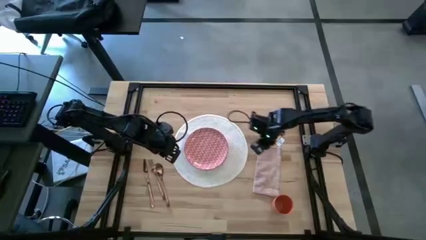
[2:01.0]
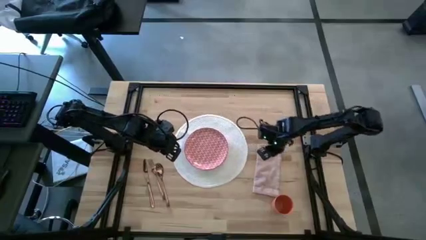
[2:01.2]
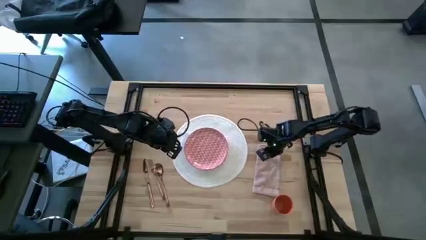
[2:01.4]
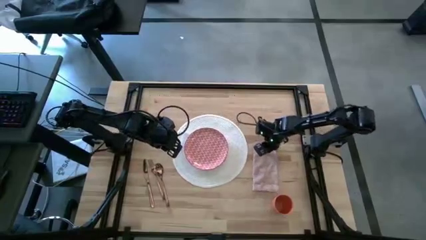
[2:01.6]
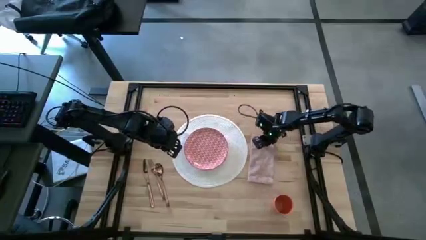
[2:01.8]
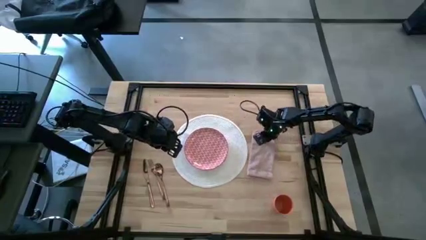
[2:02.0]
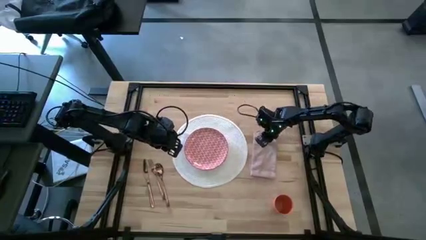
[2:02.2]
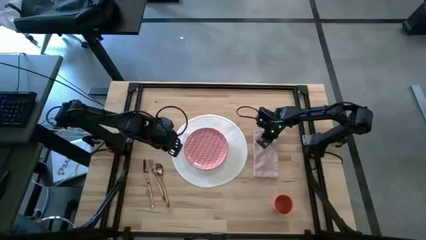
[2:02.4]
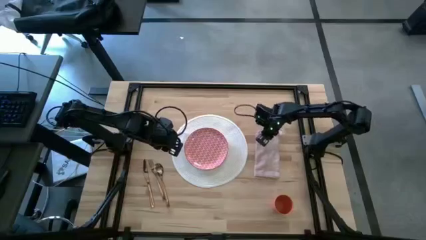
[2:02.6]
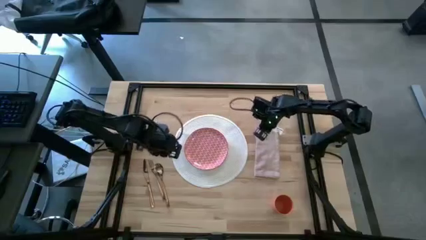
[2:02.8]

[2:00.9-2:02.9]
Task: Set table place
Adjust the pink napkin to the right of the white placemat

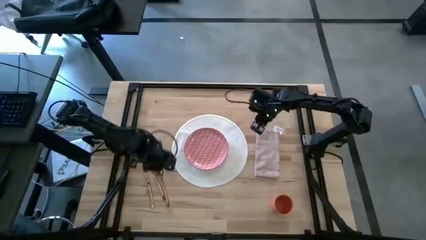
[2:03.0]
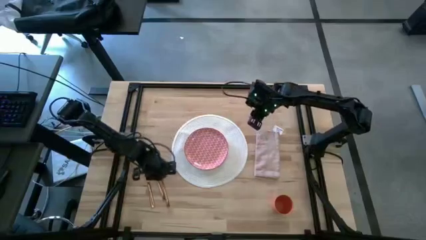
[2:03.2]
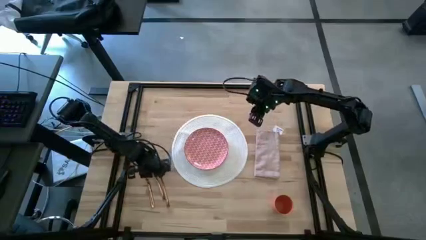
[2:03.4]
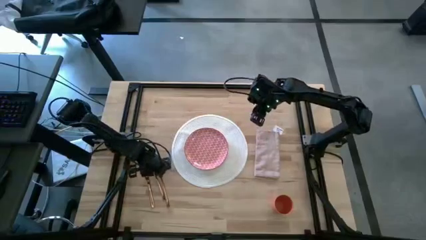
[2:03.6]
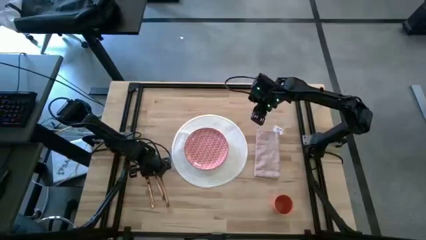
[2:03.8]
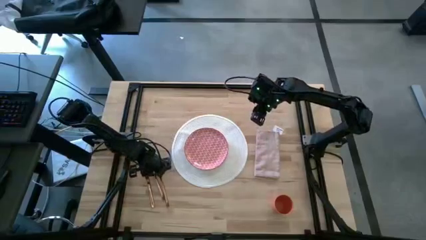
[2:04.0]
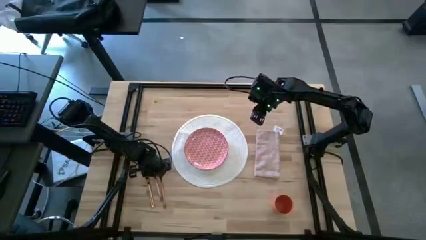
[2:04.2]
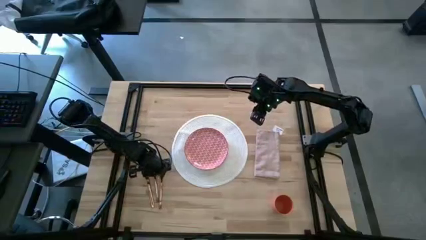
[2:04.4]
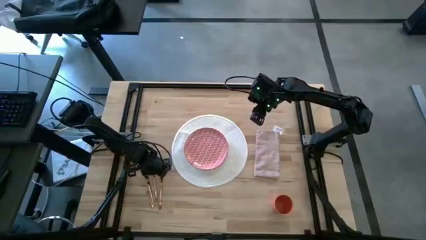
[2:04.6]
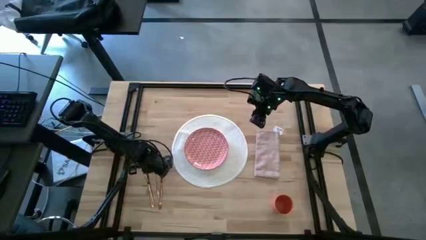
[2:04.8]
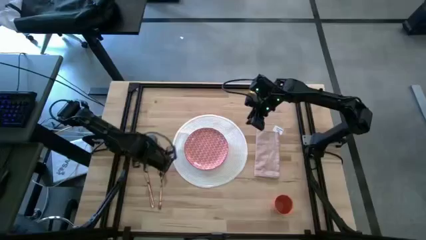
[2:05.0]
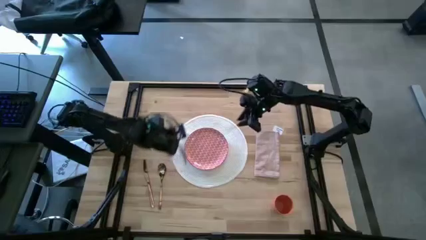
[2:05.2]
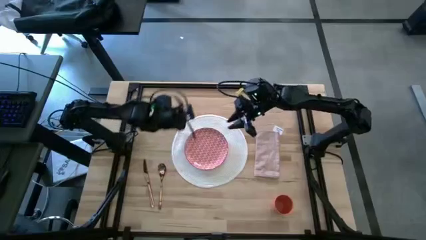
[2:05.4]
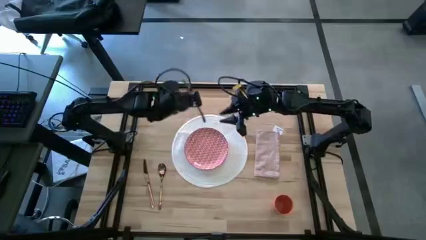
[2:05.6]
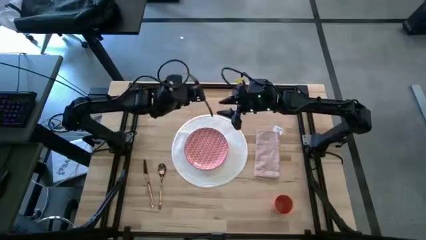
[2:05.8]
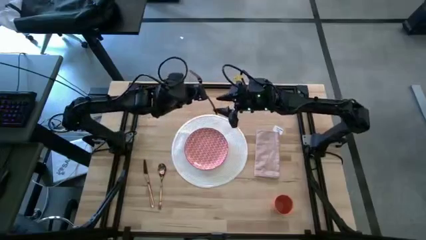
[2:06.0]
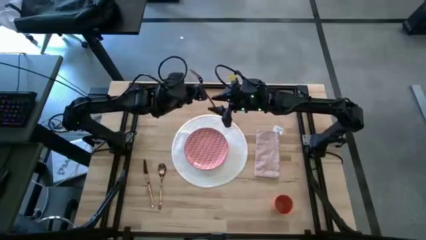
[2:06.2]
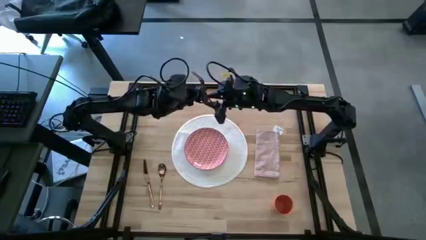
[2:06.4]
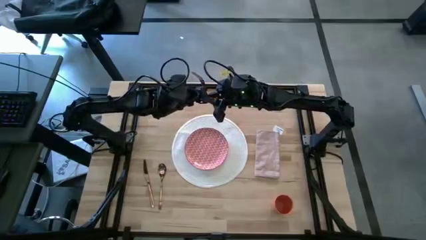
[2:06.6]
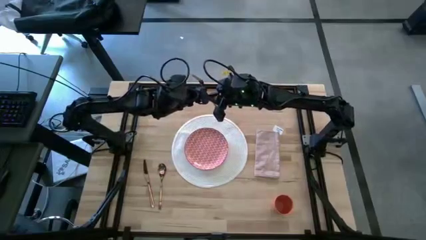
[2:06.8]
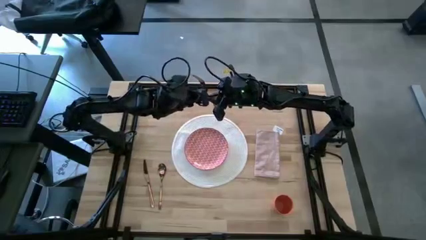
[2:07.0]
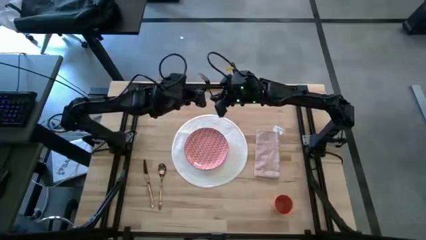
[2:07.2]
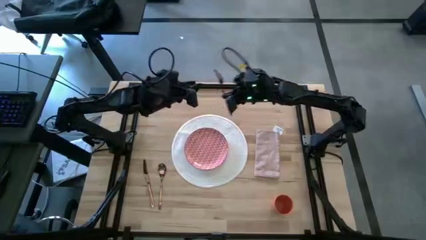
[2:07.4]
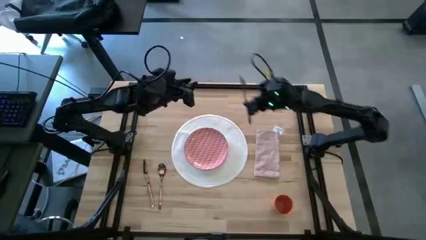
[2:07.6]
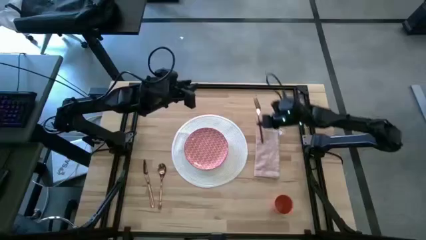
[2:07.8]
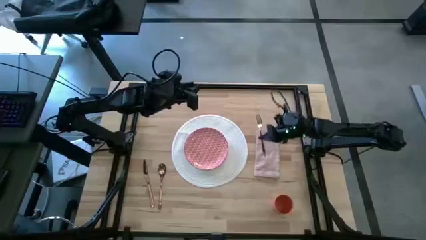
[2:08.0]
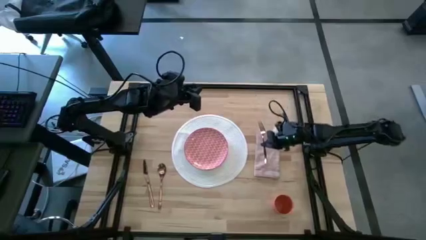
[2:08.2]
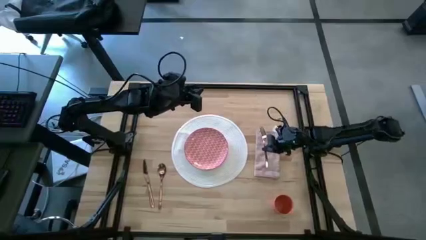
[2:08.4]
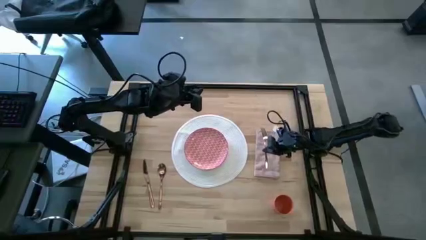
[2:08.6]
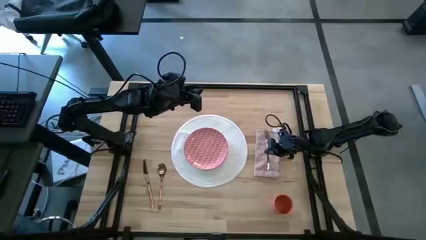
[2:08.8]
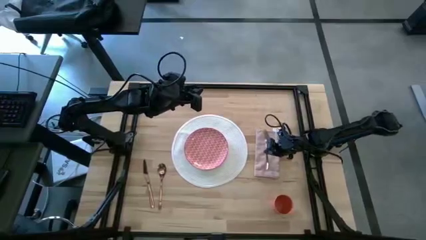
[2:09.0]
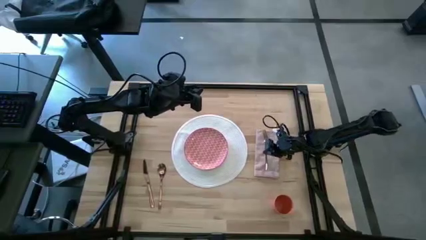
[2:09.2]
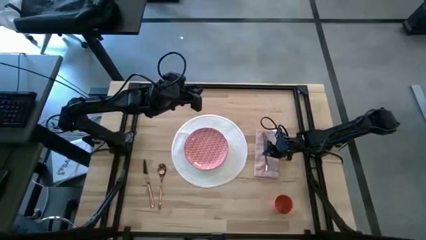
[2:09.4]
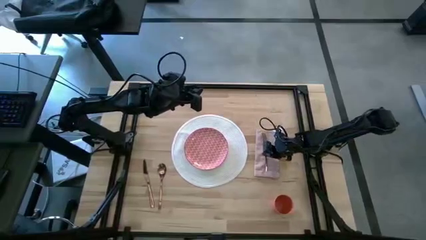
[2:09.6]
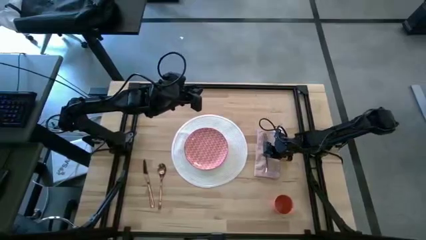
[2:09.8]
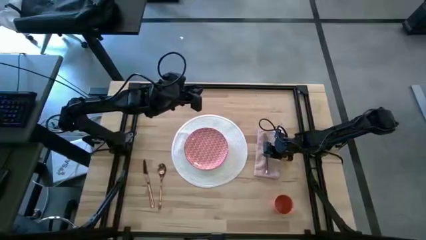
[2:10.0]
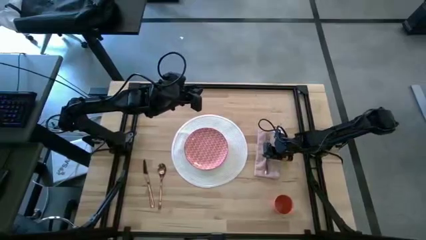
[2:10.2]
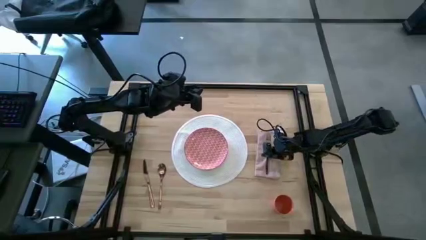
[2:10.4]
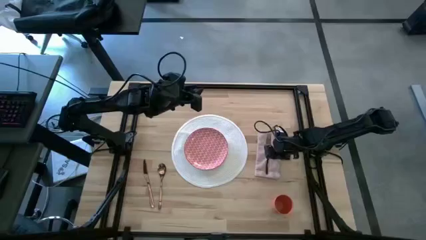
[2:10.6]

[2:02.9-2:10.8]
Put the fork on top of the pink napkin

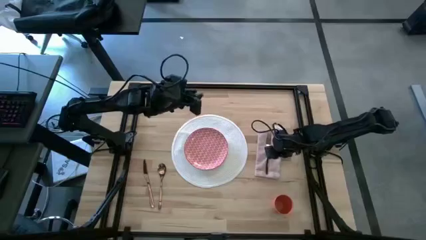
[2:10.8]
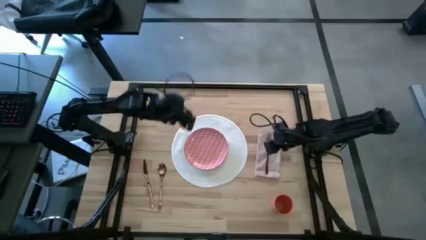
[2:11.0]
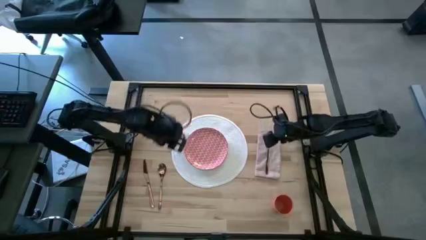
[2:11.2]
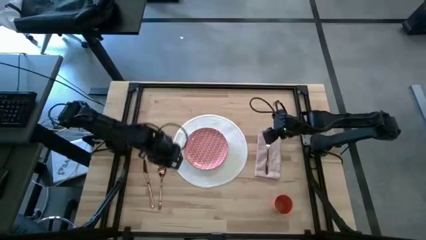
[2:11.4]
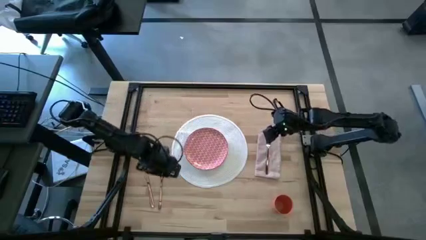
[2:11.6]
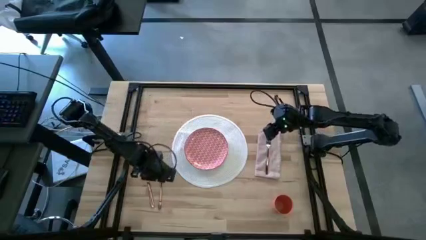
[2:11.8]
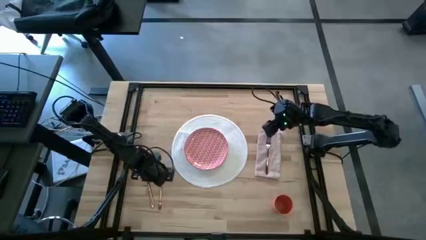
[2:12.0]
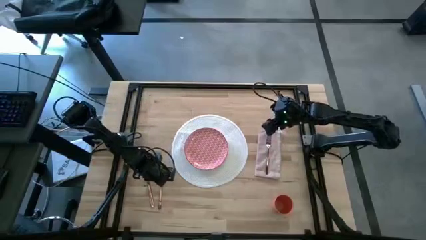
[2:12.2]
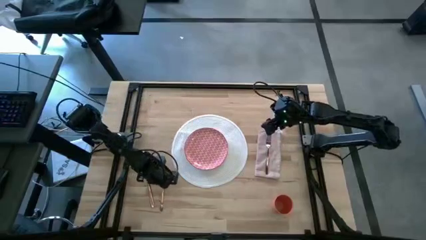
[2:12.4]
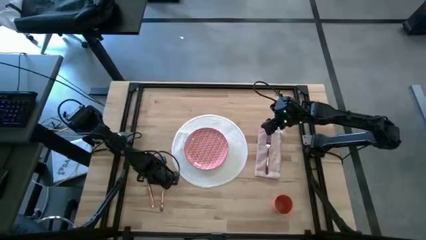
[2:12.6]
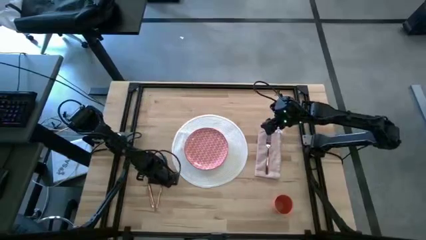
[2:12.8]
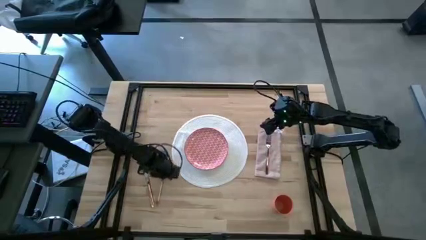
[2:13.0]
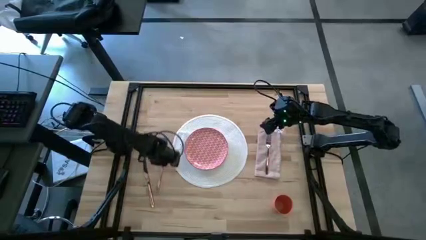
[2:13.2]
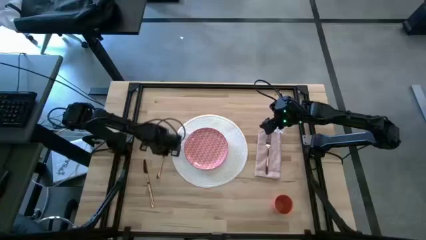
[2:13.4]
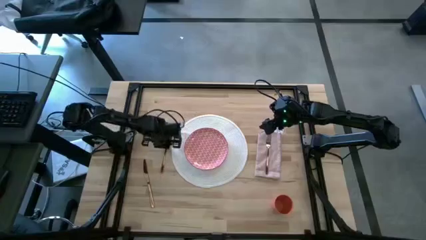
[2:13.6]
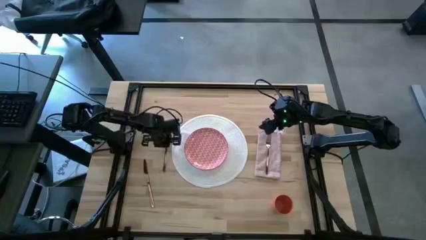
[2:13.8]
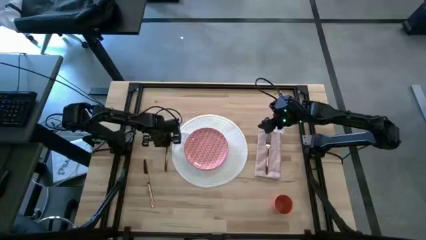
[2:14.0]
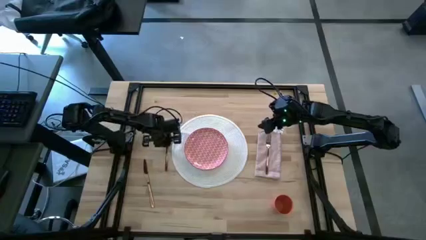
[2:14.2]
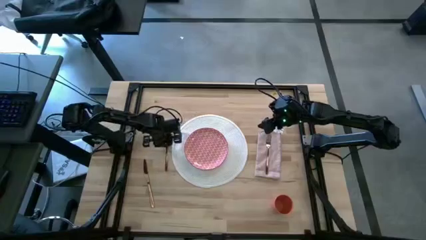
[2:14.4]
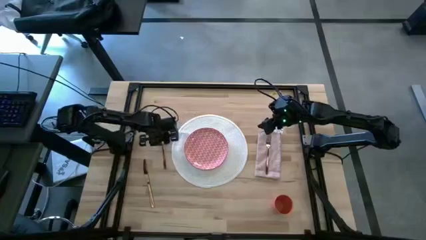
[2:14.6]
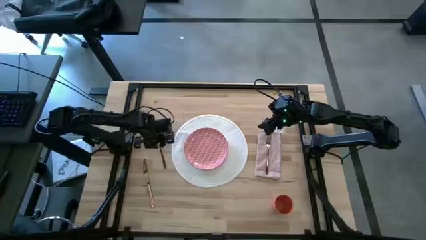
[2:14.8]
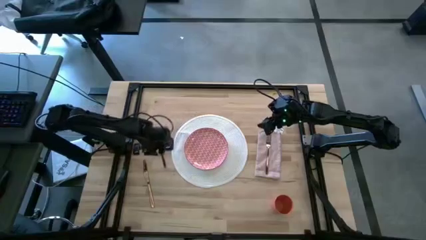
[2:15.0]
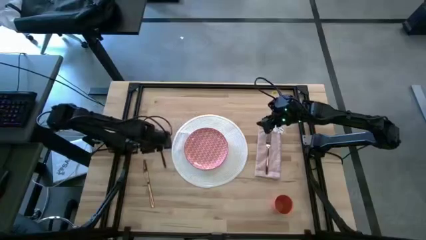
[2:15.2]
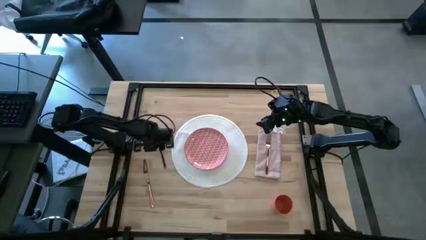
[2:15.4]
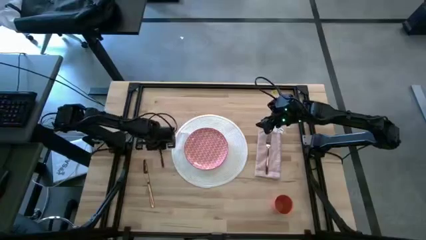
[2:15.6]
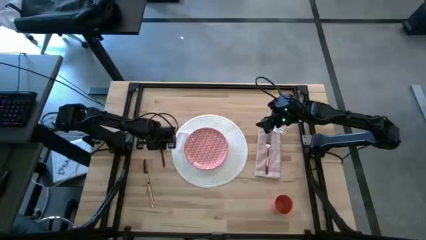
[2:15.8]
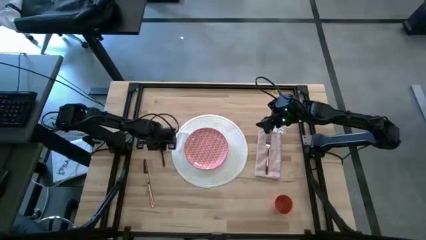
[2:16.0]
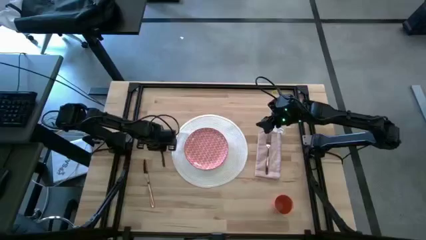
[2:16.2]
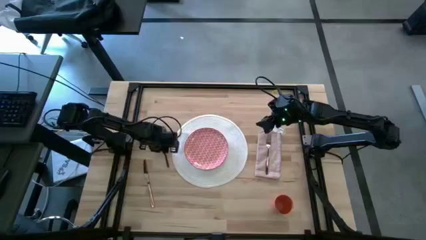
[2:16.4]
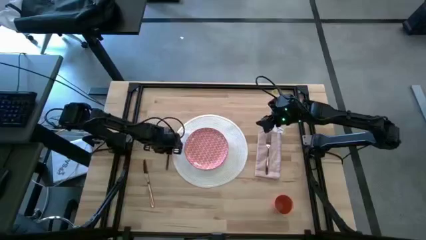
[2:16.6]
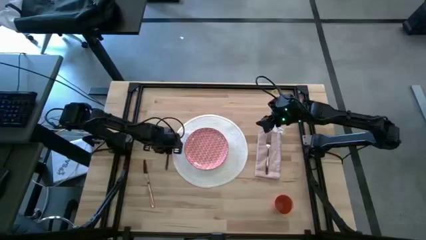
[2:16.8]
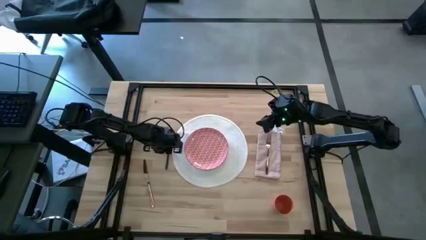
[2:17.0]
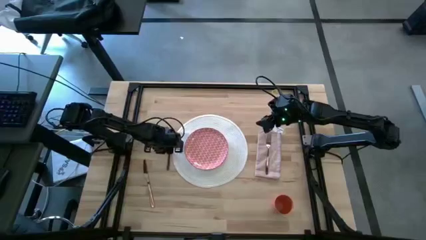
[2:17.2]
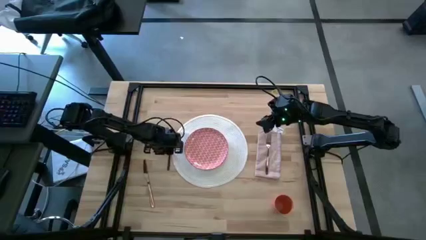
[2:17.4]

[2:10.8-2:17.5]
Put the spoon to the left of the placemat
